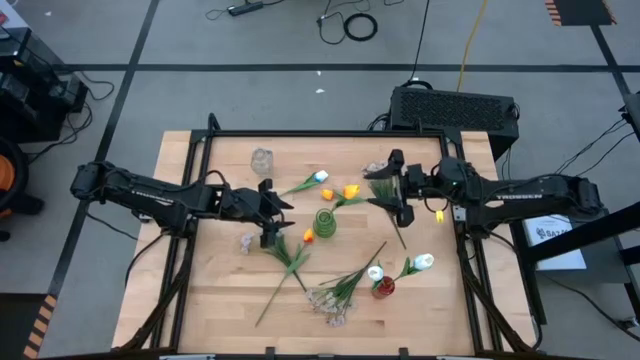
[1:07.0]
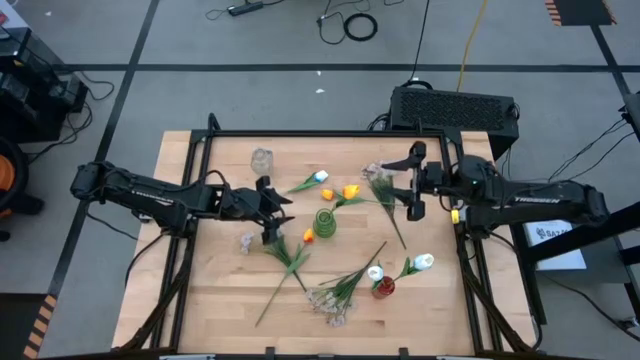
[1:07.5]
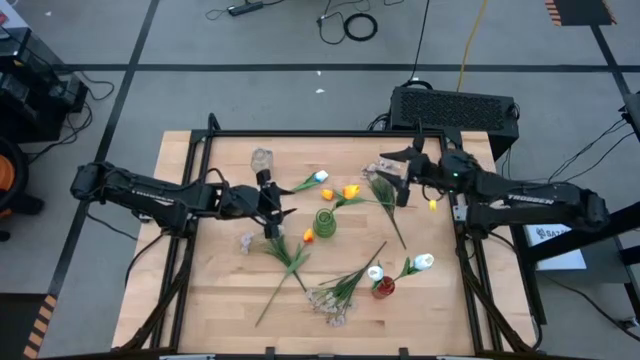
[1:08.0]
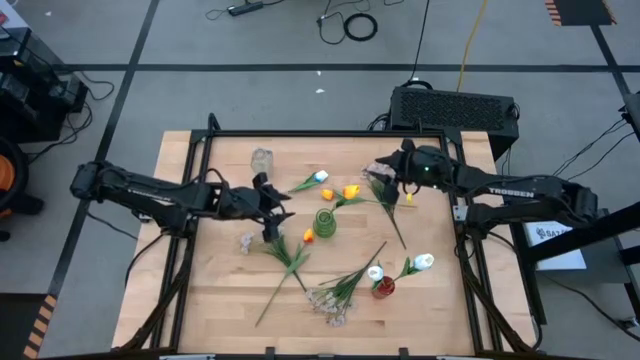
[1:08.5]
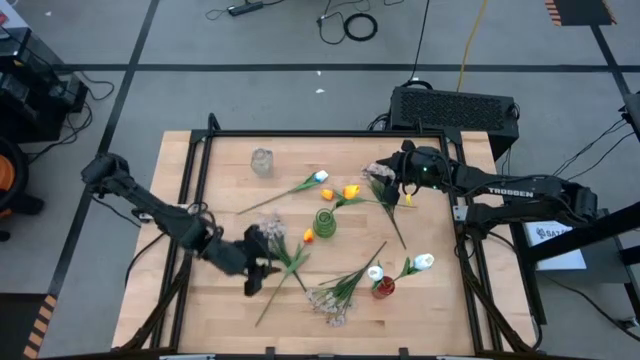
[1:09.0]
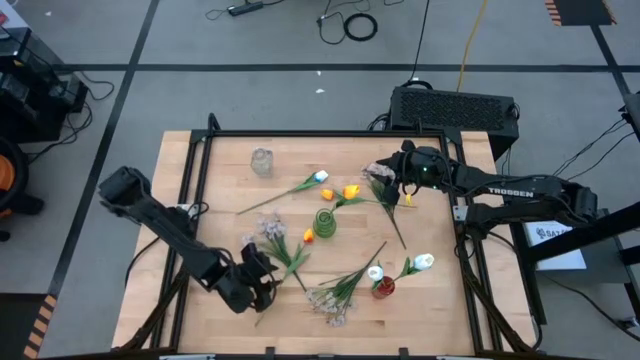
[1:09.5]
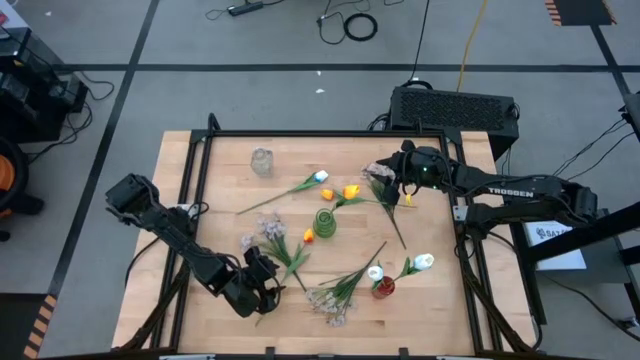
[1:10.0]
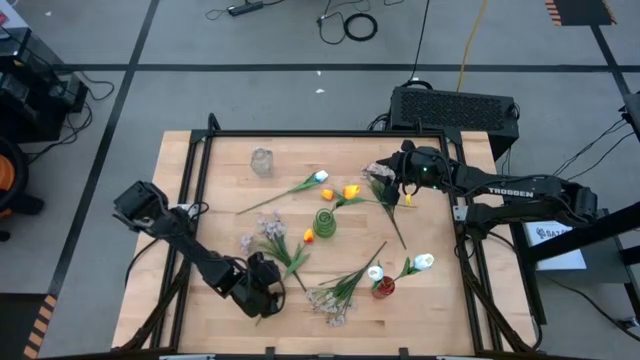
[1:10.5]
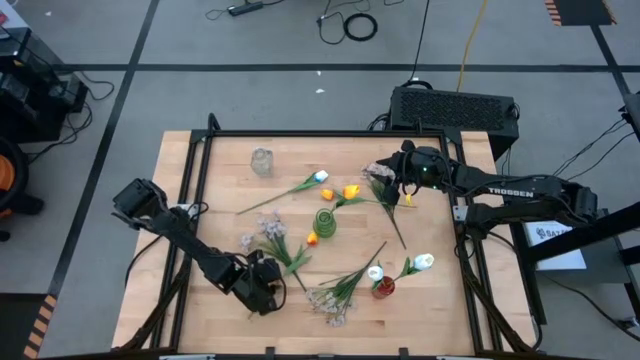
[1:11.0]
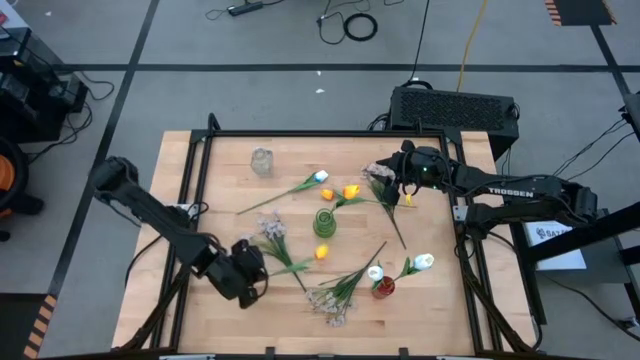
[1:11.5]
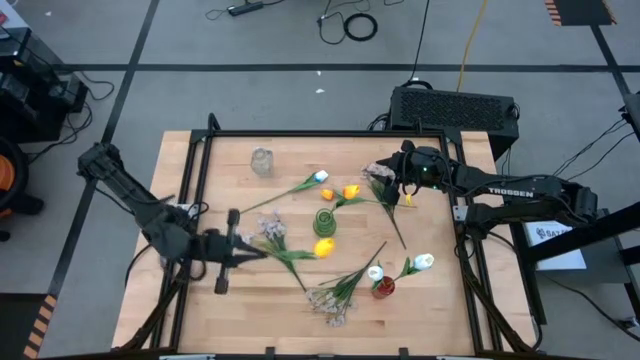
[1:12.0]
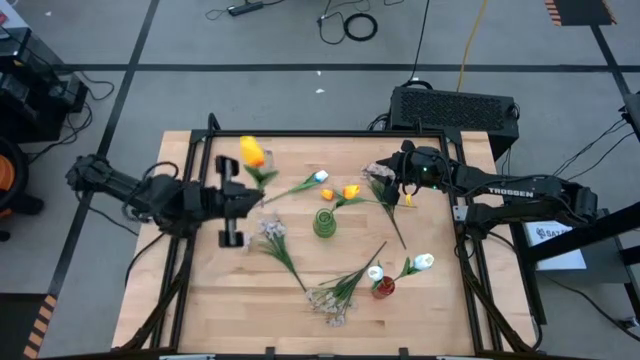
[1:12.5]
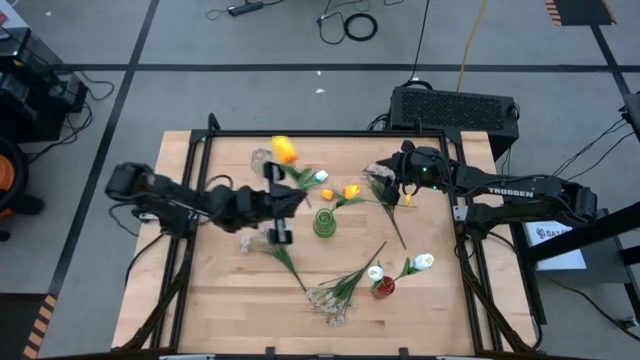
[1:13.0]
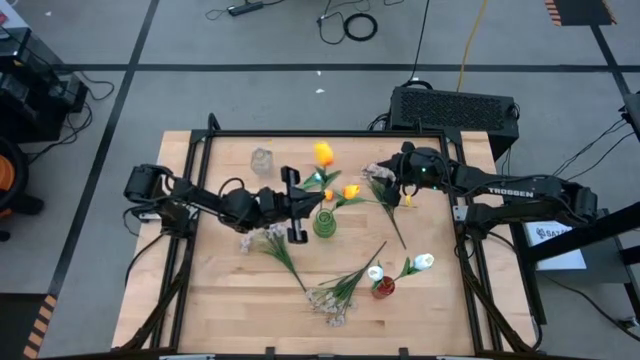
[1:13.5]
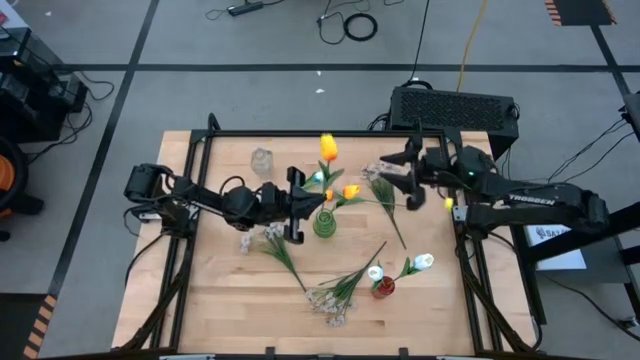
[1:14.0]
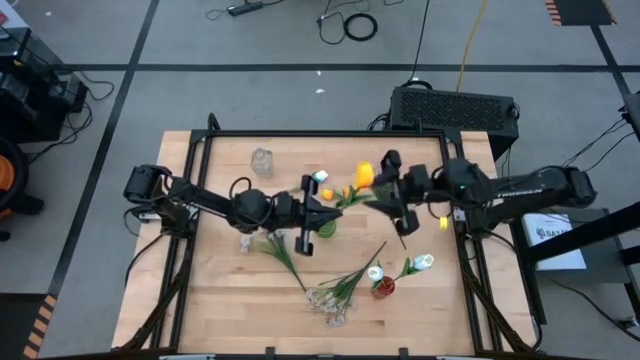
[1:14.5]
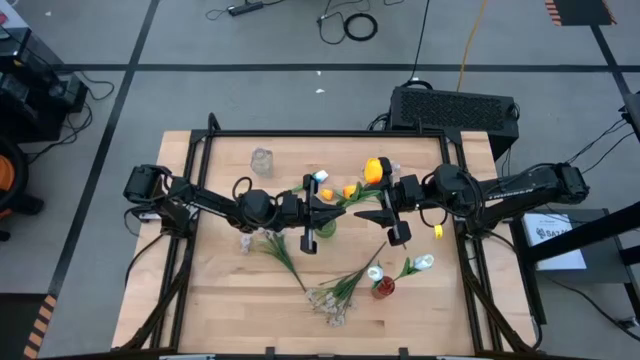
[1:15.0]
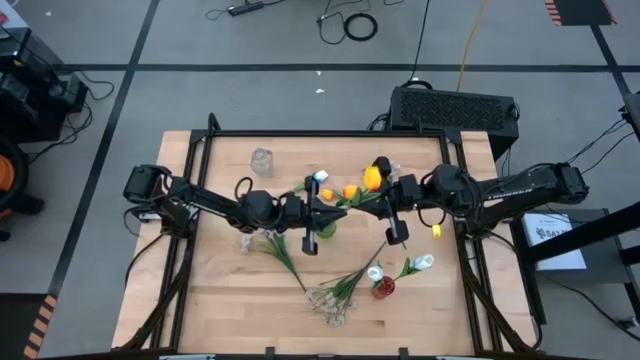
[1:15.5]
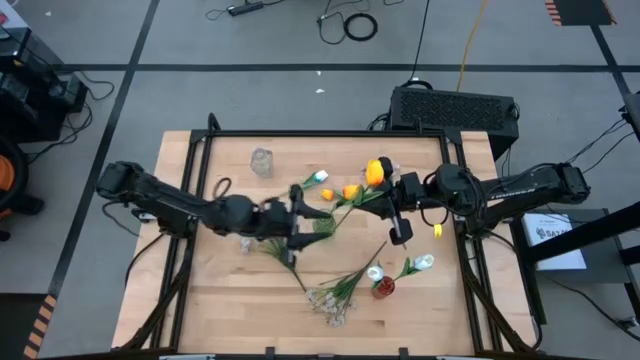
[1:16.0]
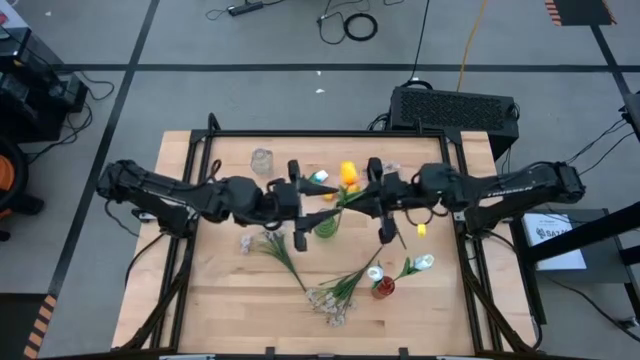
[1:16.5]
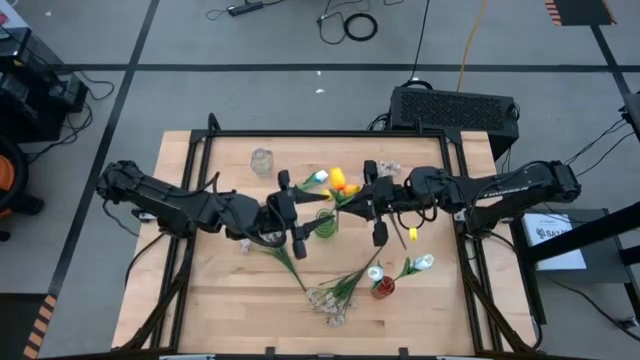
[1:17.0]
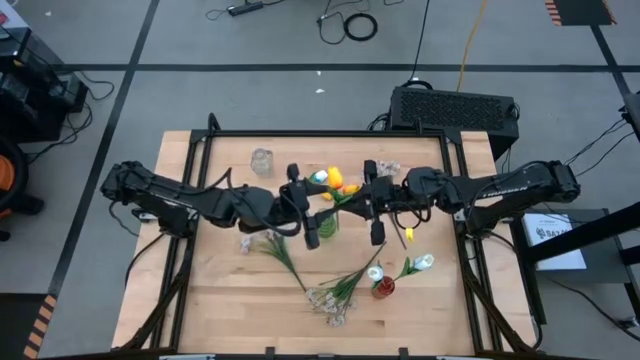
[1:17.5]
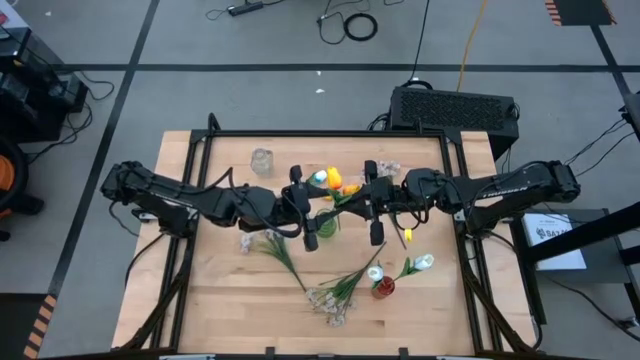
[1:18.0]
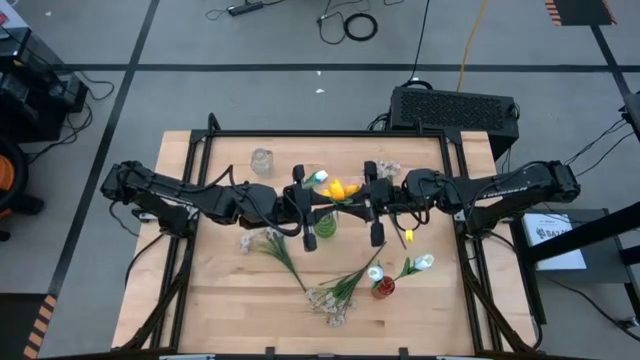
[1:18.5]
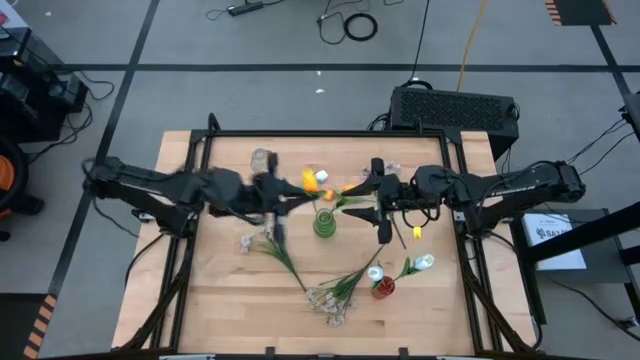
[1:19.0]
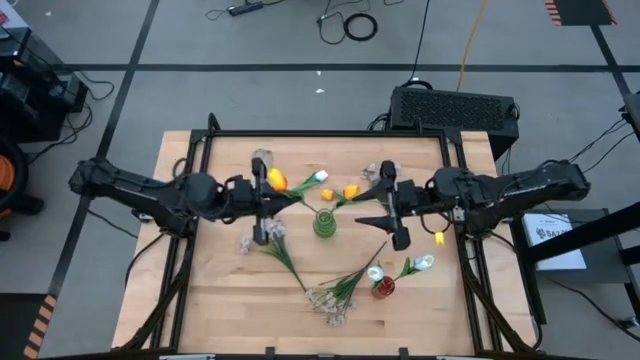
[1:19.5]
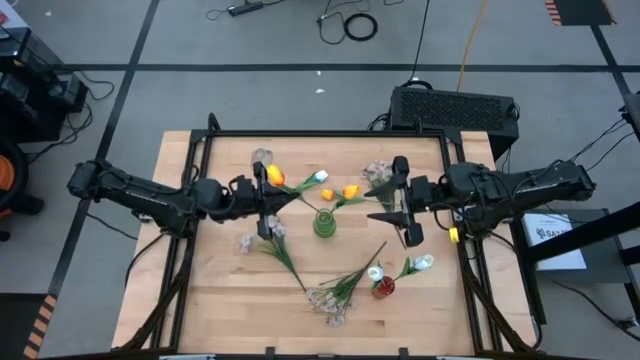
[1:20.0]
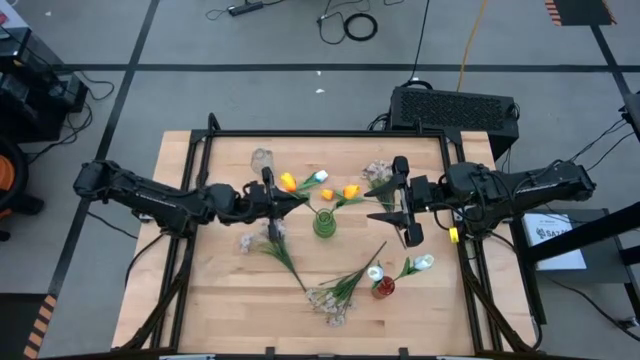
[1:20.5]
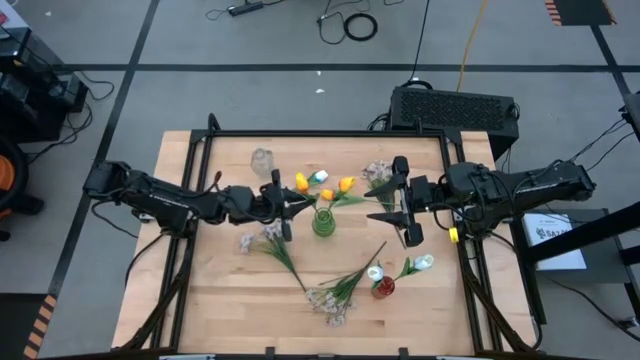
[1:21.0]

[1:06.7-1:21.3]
Task: Sort flowers into vase by color
Put the bottom yellow tulip into the green vase

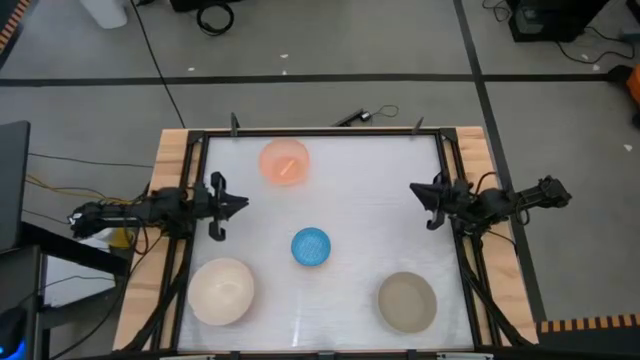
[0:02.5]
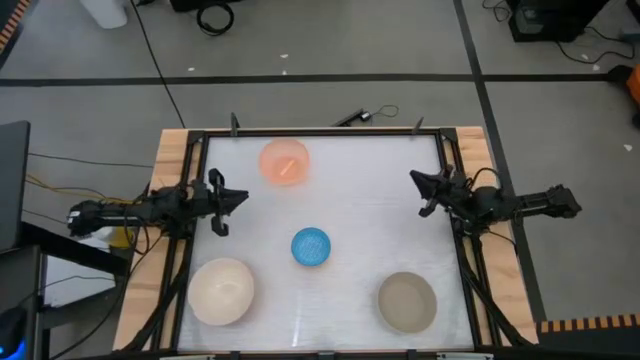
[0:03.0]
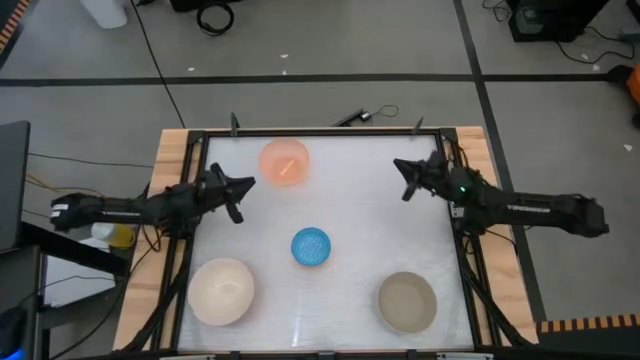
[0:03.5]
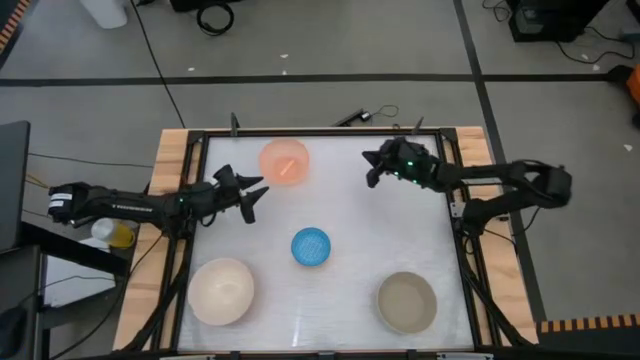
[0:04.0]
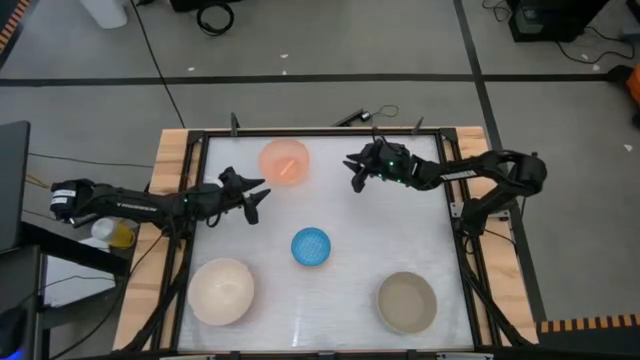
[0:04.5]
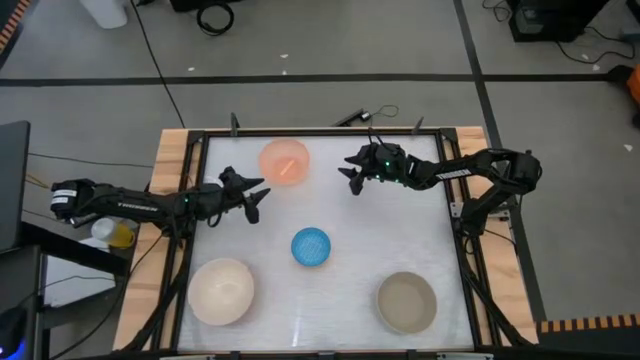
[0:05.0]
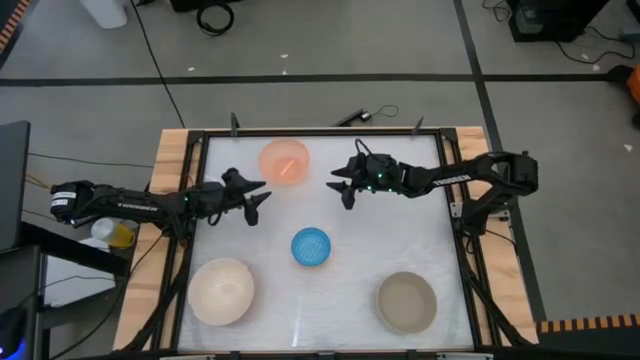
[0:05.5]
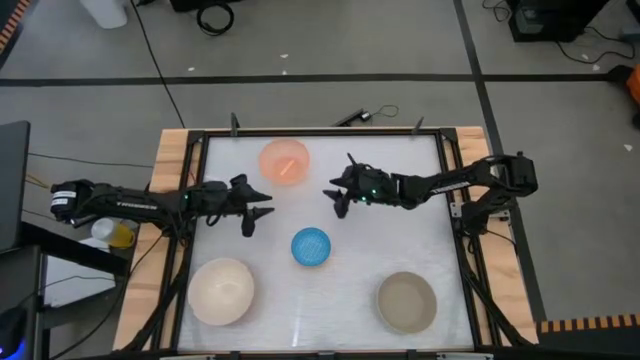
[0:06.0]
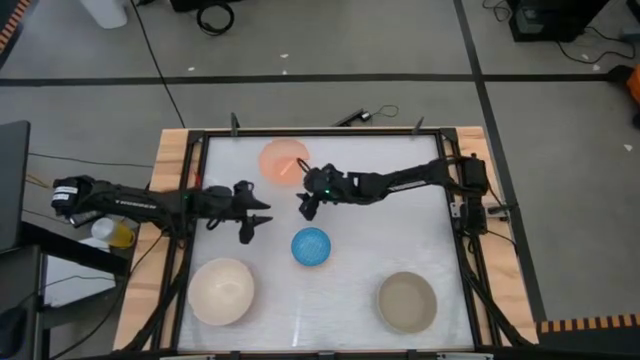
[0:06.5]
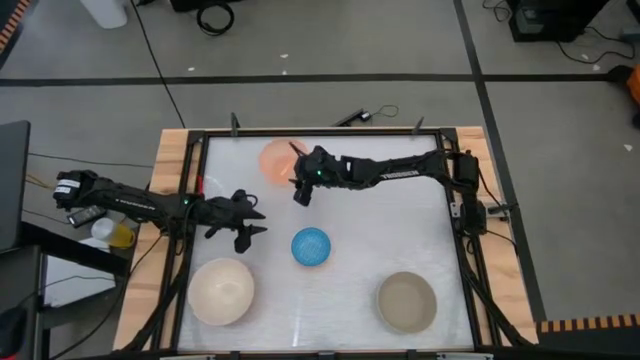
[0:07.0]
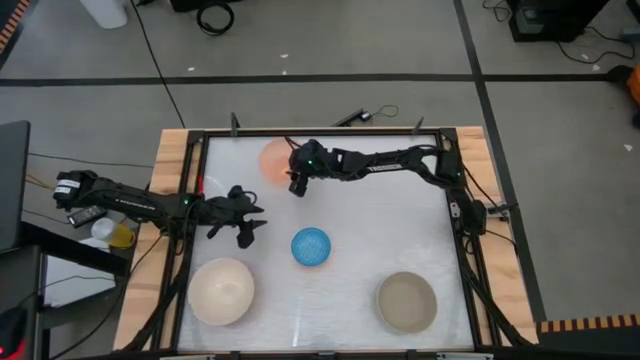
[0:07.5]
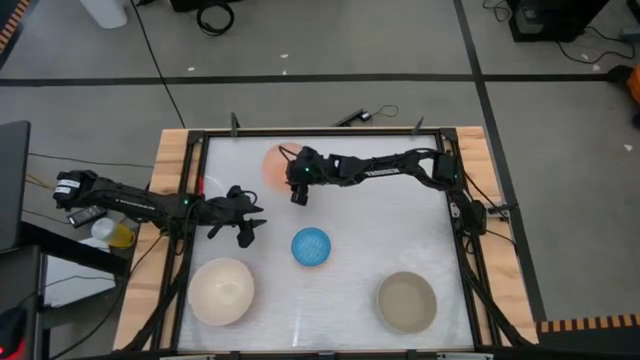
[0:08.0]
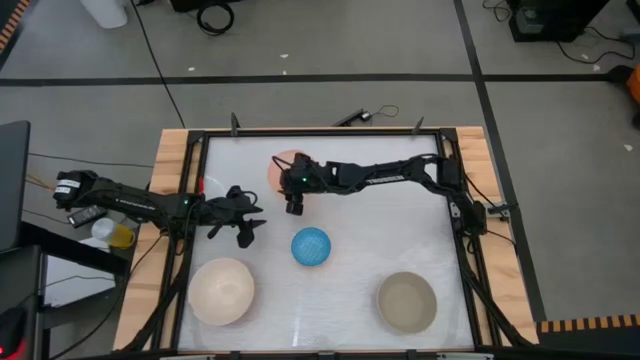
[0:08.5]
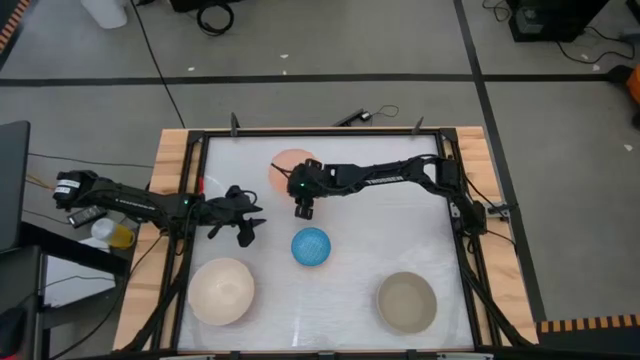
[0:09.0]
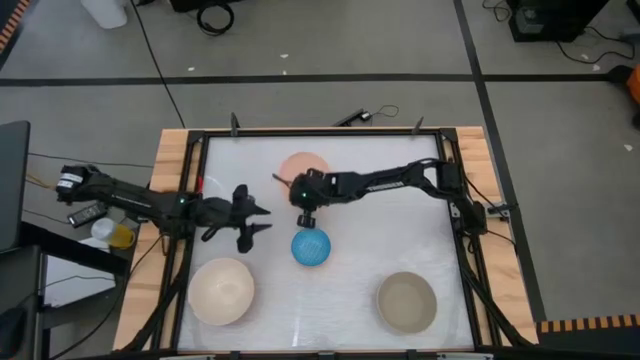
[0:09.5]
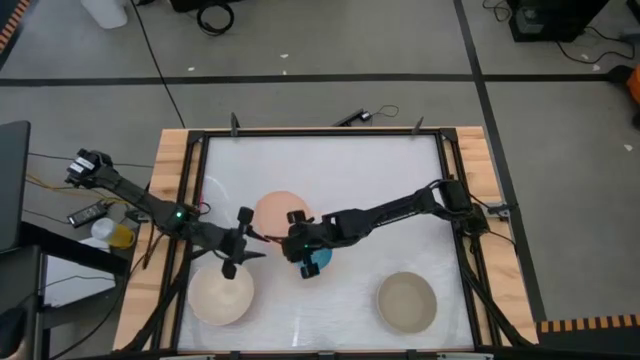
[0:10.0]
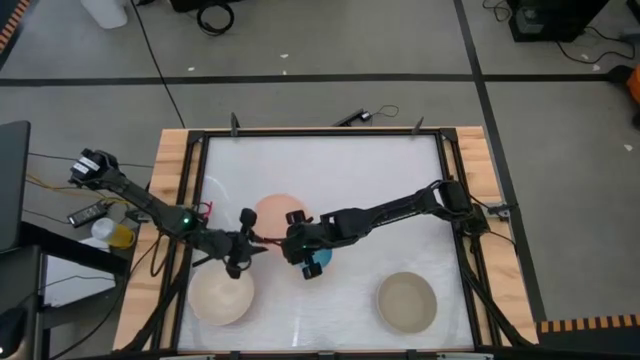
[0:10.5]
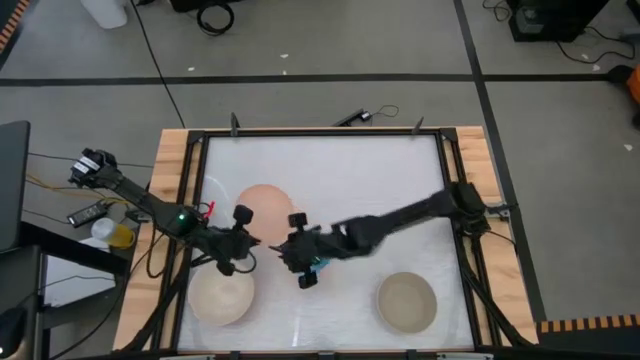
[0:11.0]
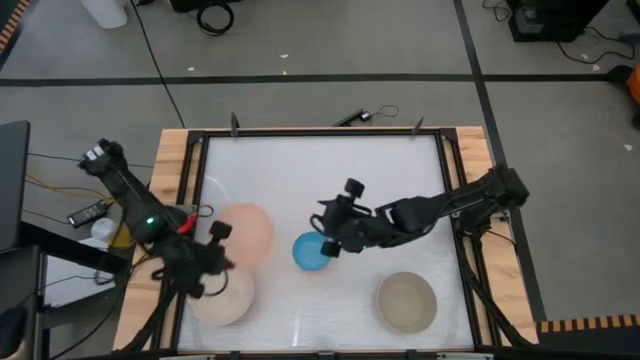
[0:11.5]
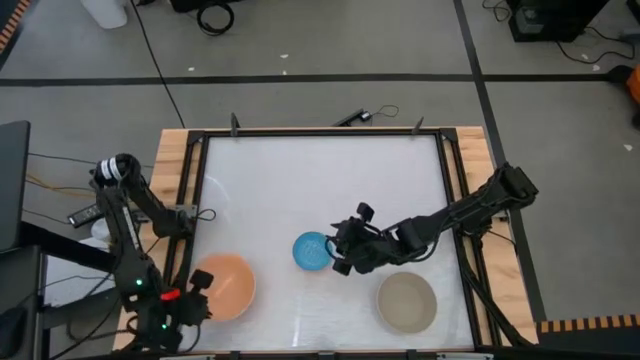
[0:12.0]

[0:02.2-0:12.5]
Task: Nest bowls inside each other by size order
Stack the orange bowl on the white bowl
